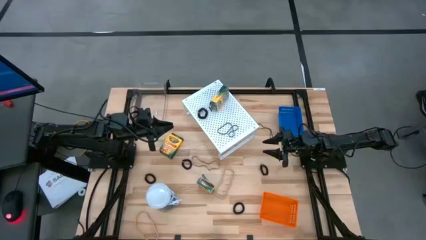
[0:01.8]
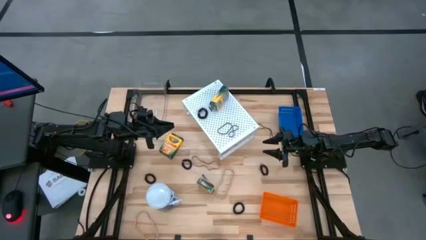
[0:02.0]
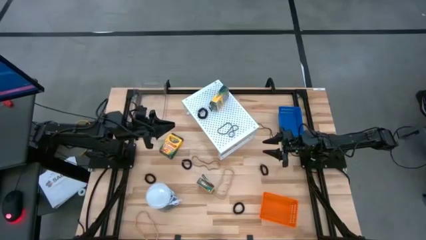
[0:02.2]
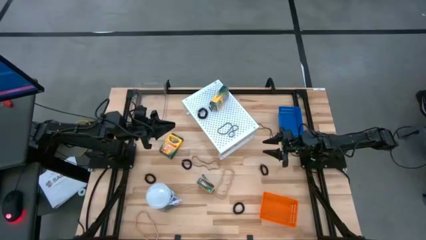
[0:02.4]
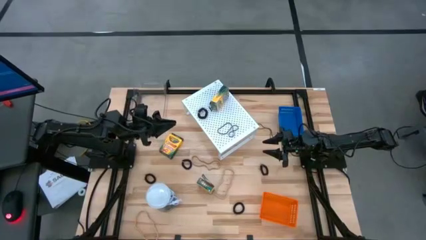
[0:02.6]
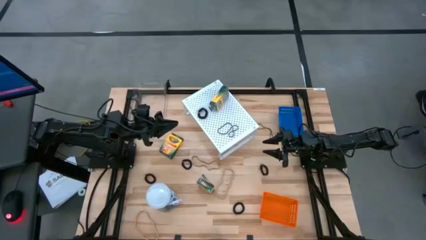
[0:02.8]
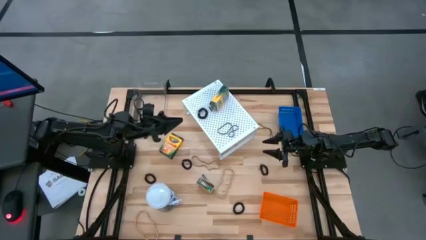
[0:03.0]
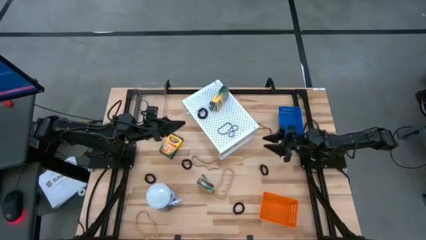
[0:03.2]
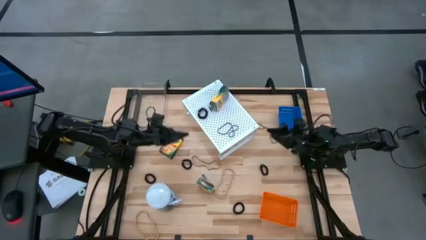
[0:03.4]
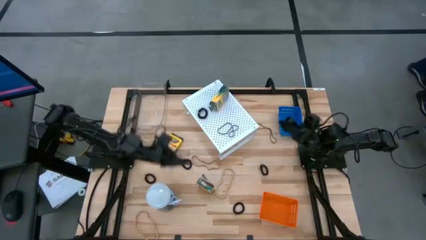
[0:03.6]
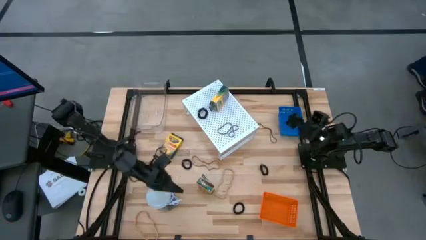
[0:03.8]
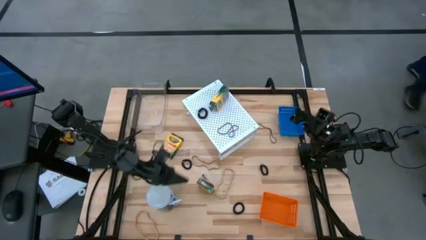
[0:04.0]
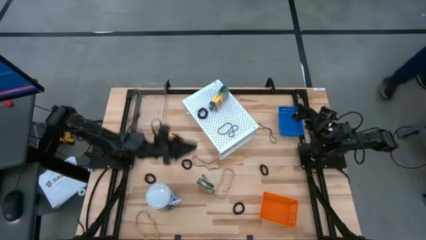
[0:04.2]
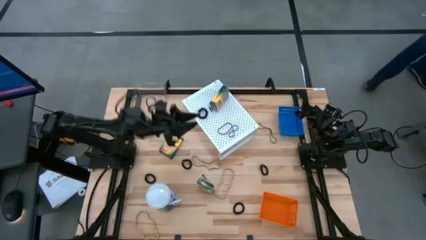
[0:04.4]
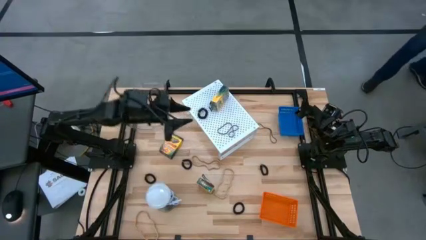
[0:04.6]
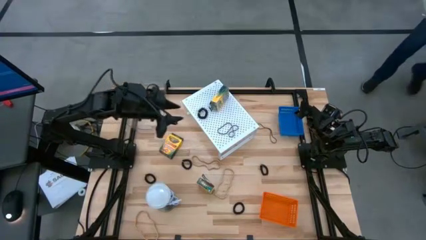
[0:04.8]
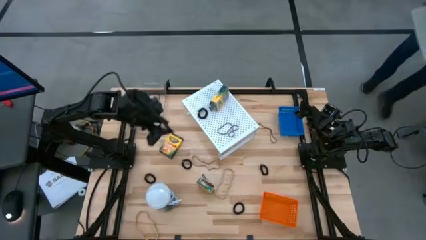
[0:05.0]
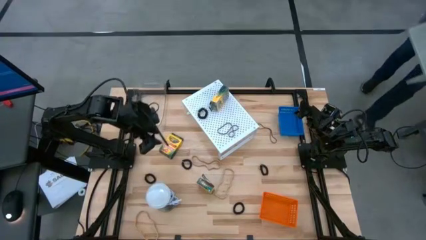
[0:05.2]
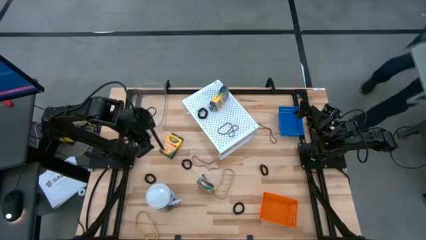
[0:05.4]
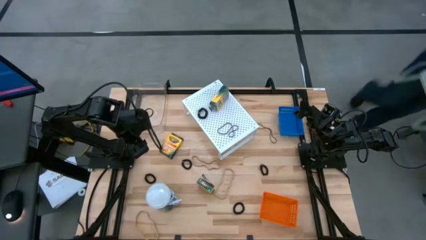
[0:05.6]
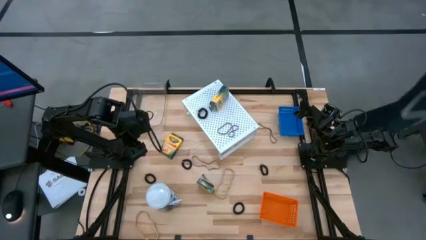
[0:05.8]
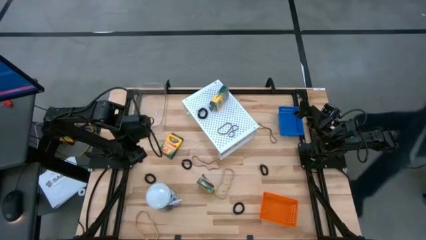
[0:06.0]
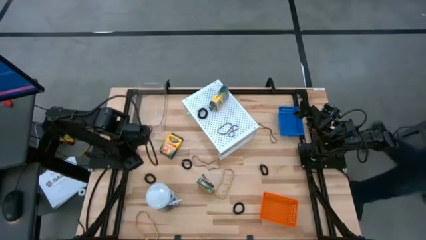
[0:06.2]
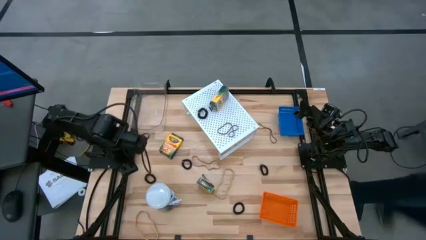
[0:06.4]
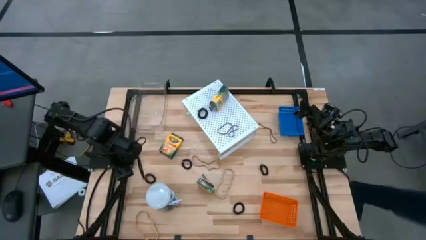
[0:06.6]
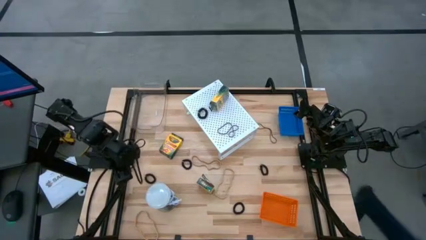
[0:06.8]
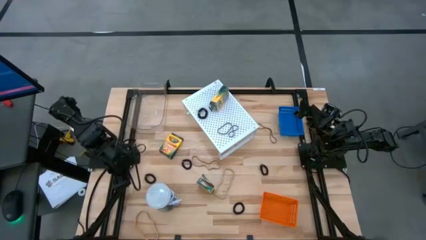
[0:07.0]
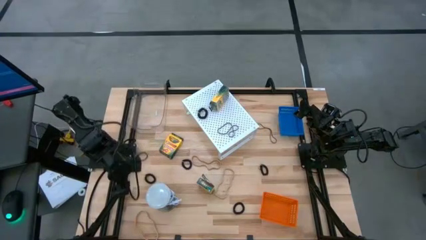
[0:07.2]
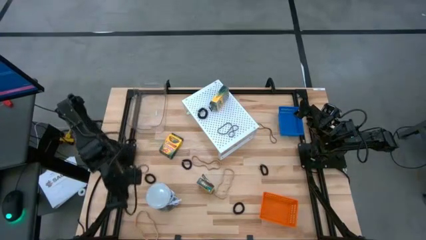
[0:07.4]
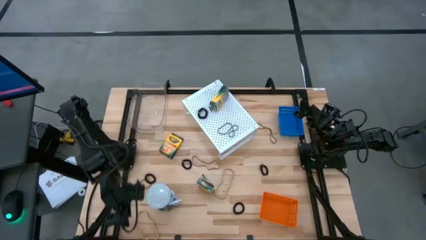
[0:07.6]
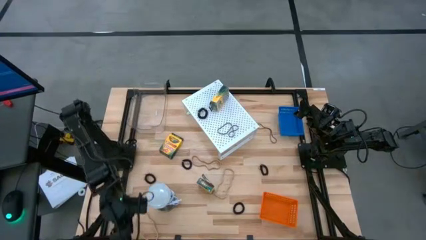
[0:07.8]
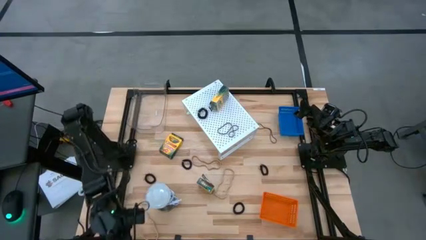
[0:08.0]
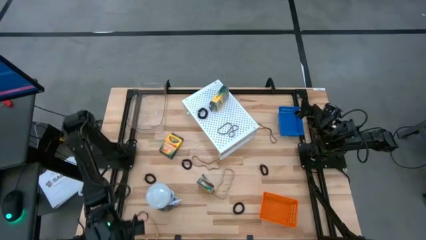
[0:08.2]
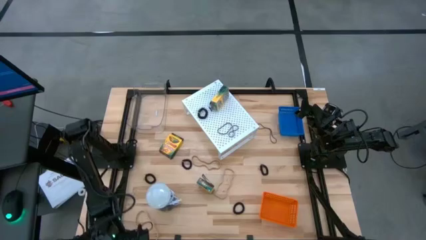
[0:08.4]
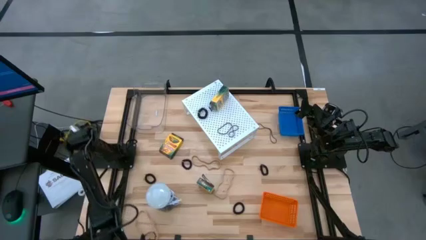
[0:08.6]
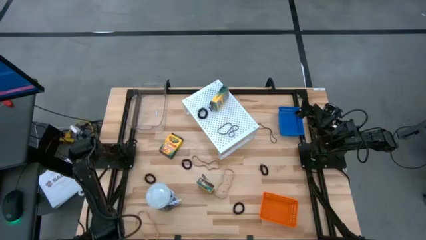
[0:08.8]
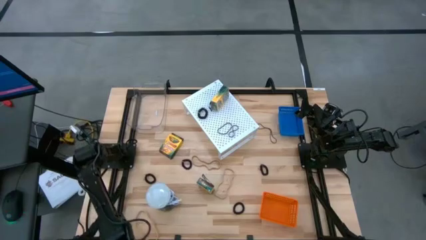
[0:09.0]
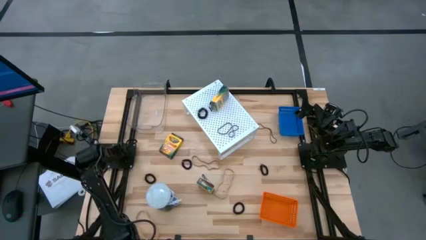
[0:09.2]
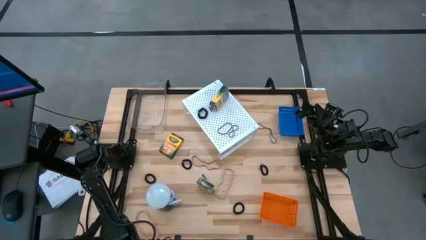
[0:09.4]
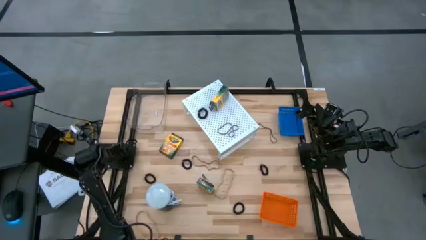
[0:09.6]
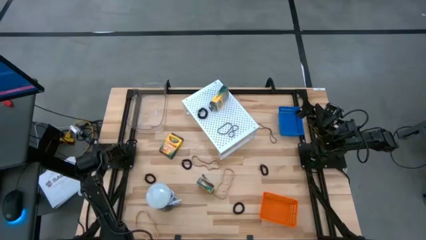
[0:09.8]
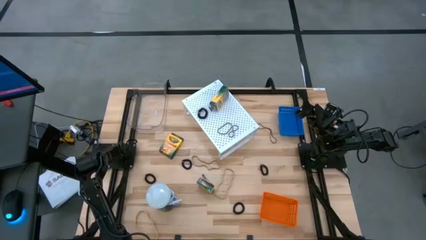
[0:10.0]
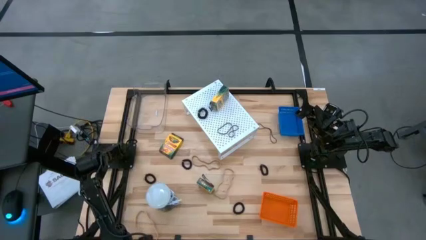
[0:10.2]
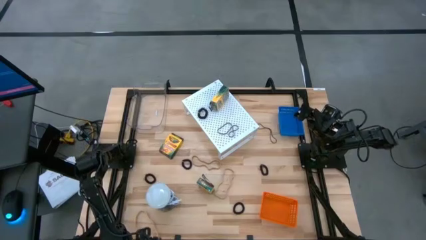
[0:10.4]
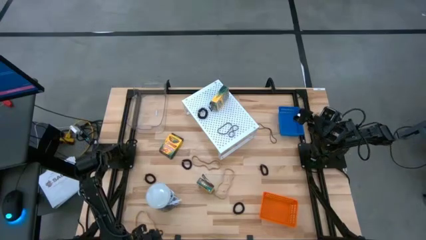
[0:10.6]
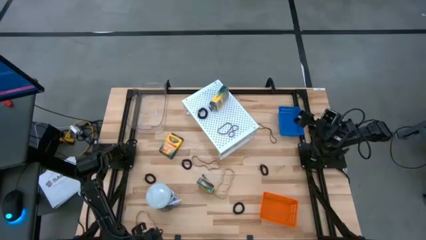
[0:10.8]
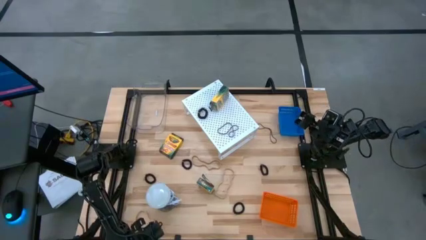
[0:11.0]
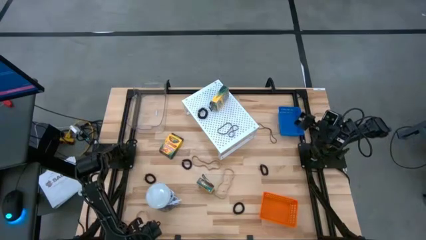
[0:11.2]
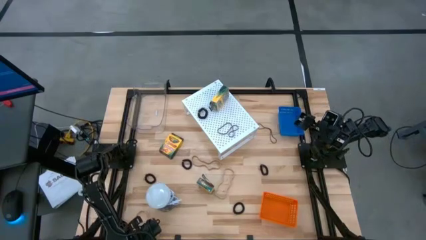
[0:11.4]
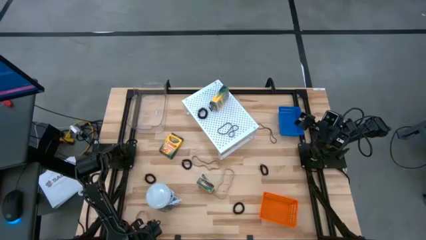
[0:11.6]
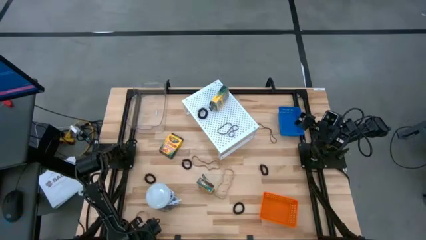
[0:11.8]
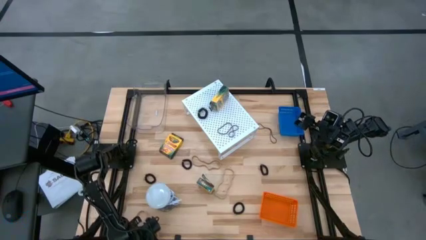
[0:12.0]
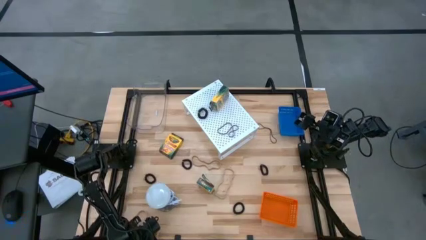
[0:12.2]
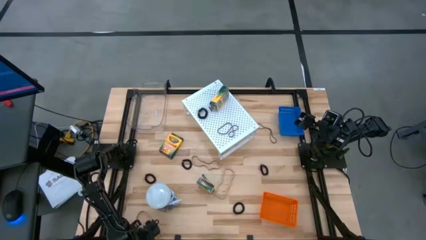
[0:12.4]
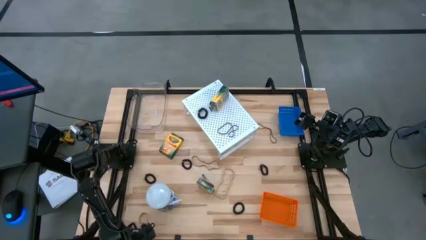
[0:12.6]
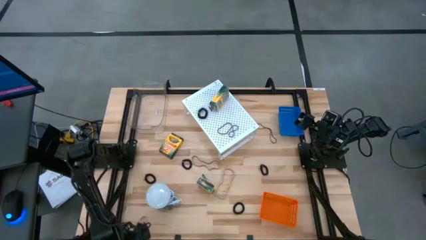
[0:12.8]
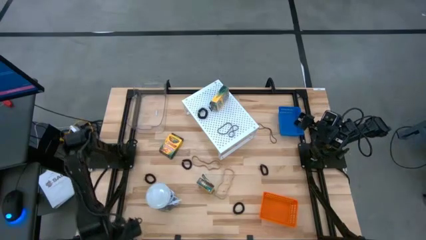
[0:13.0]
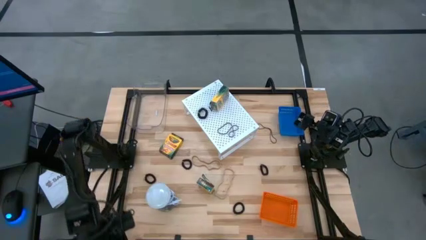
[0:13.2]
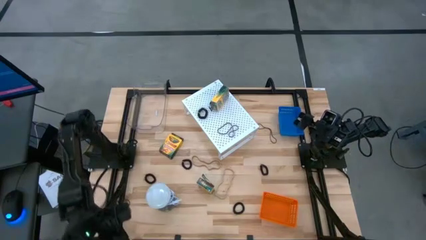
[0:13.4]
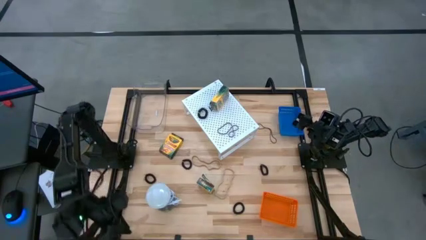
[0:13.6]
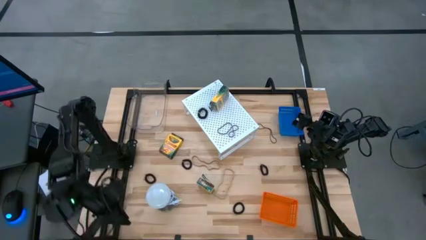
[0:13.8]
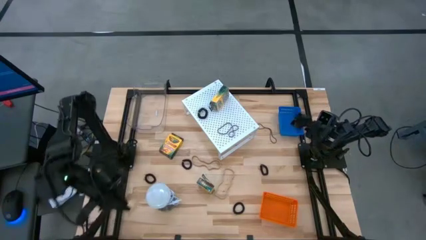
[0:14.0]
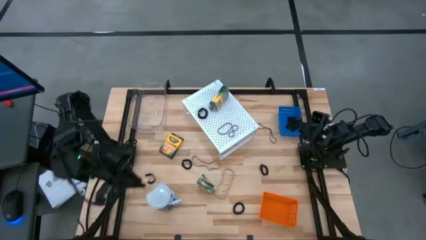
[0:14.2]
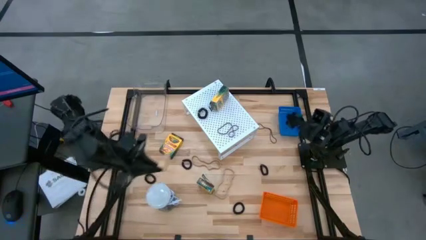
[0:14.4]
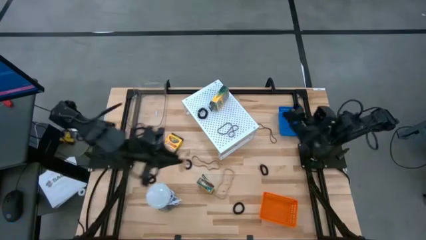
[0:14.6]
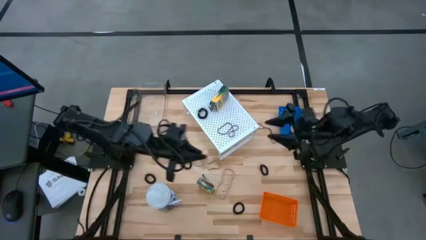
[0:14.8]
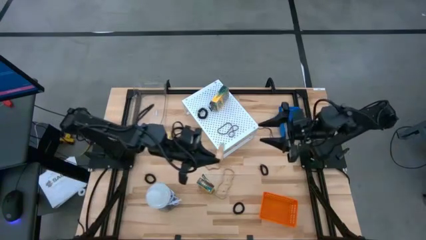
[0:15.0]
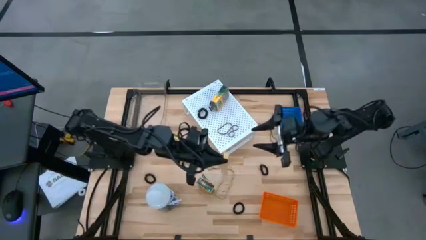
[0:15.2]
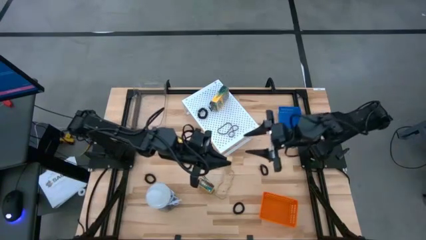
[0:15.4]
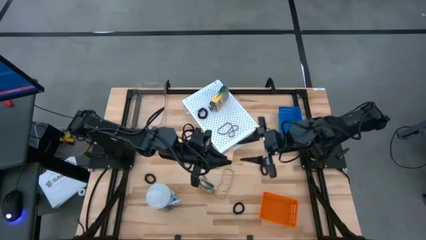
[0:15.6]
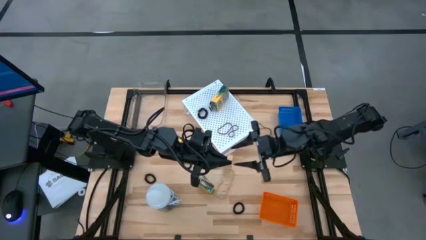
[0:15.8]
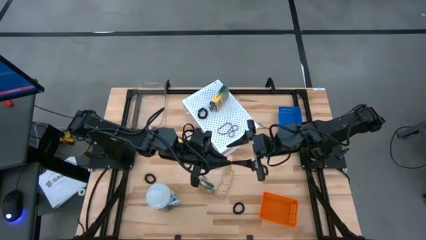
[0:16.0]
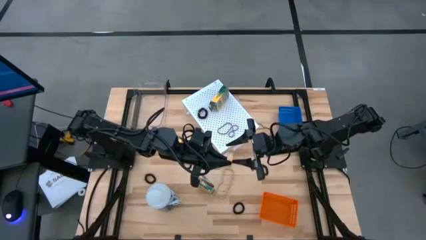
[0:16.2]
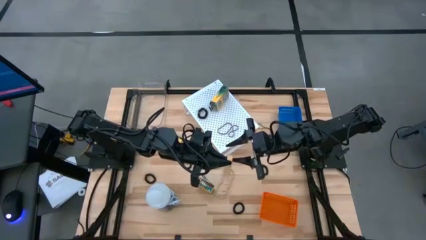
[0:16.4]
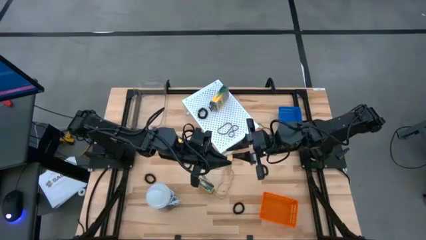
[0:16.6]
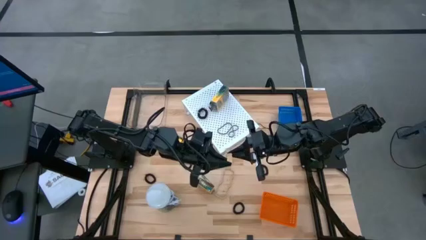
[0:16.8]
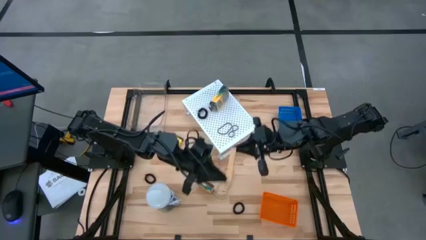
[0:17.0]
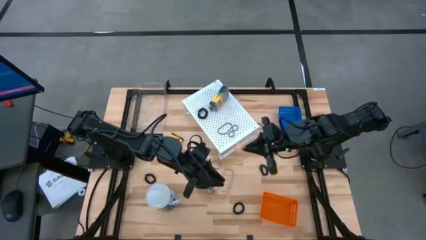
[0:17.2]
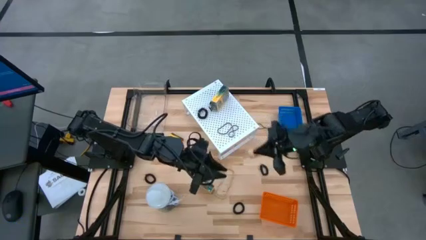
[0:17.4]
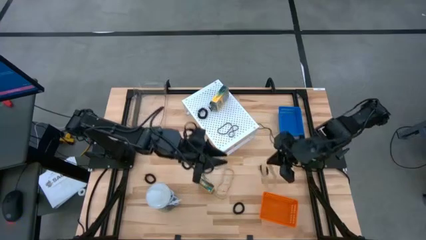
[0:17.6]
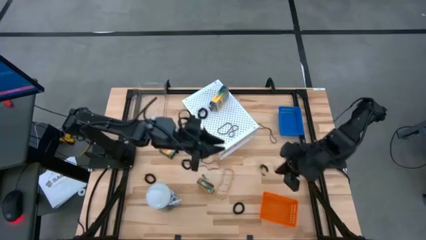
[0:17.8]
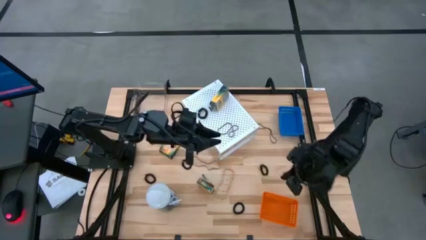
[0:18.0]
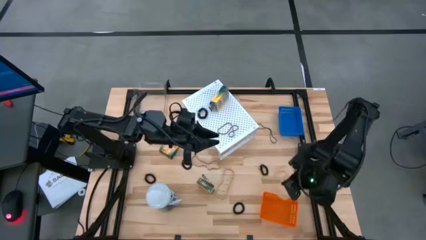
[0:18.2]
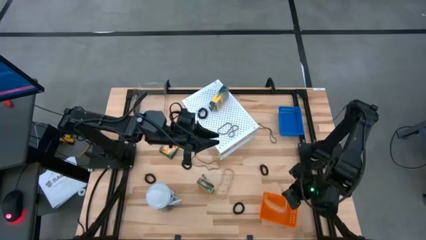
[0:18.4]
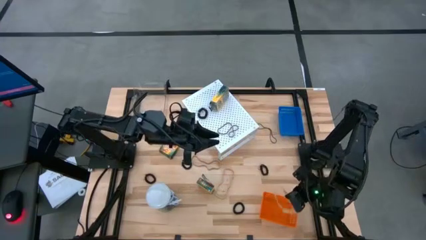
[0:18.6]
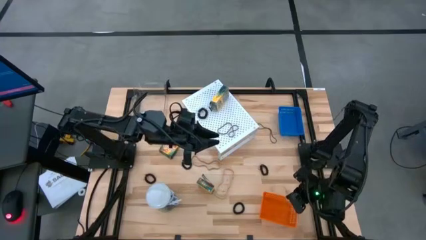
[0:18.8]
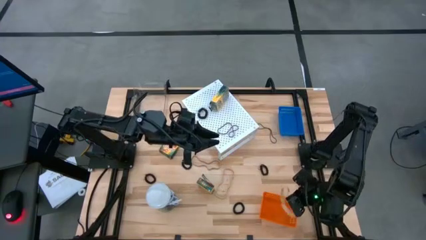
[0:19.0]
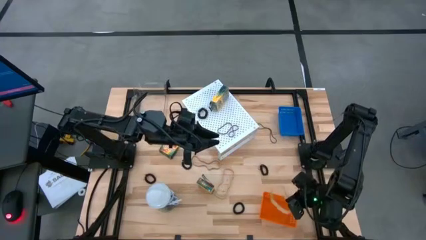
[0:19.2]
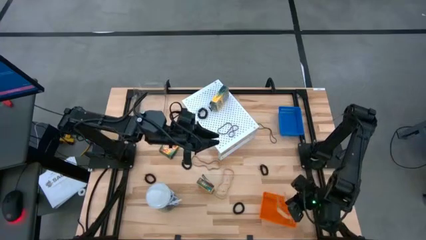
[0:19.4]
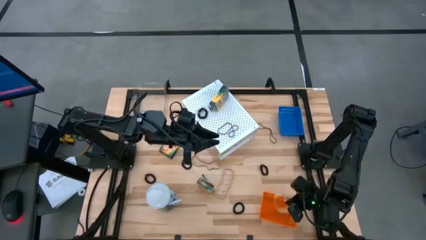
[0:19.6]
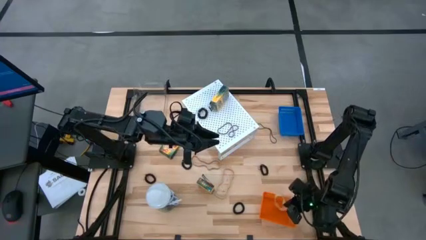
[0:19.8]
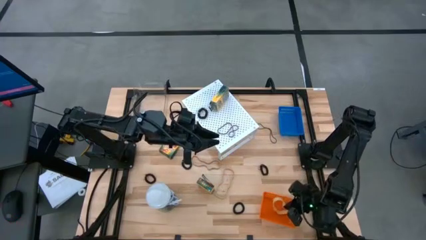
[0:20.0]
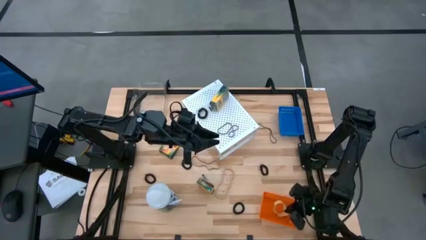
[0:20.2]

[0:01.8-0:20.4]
Task: Pick & Place Office Desk Supplies
Put the brown rubber band into the orange bin
